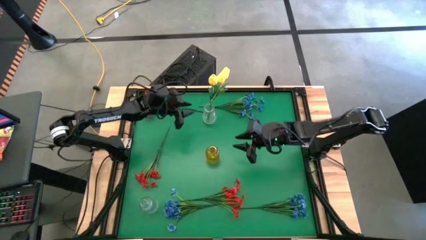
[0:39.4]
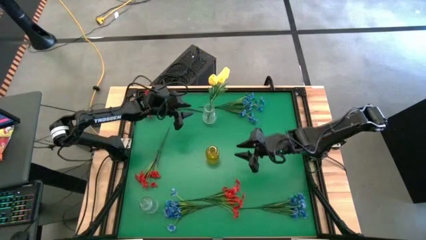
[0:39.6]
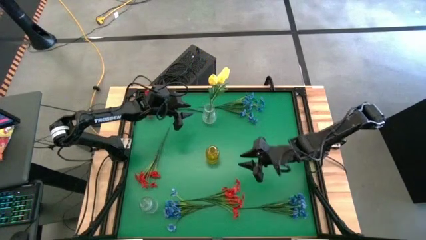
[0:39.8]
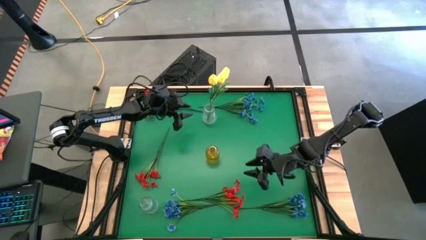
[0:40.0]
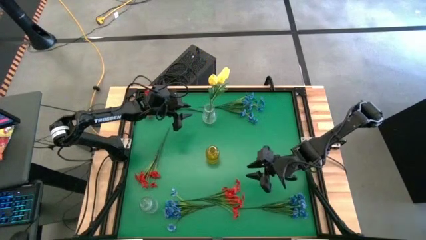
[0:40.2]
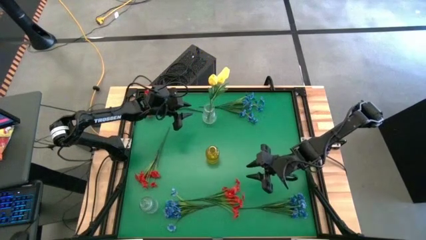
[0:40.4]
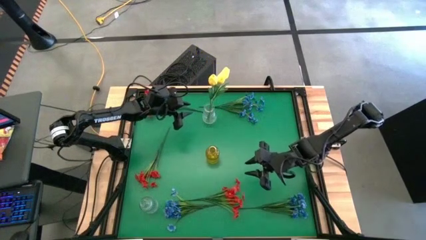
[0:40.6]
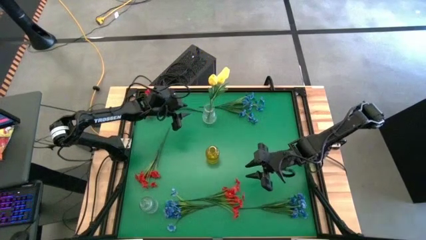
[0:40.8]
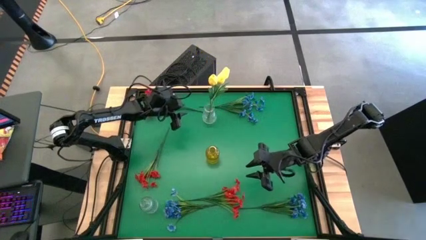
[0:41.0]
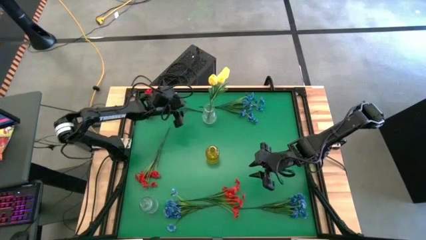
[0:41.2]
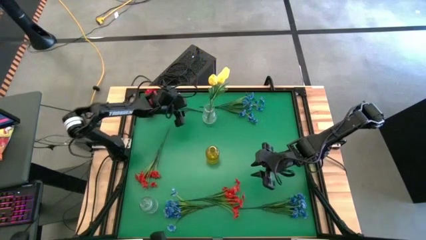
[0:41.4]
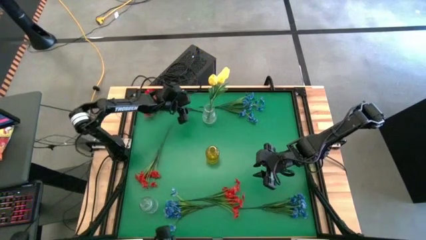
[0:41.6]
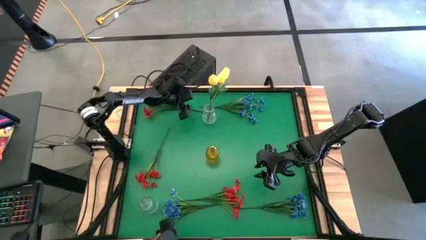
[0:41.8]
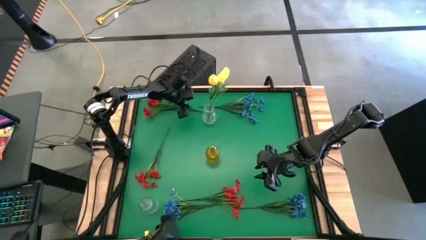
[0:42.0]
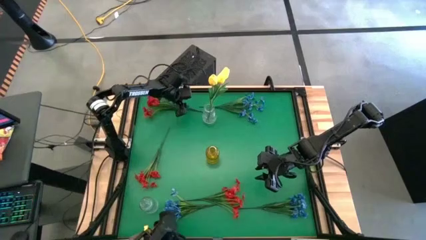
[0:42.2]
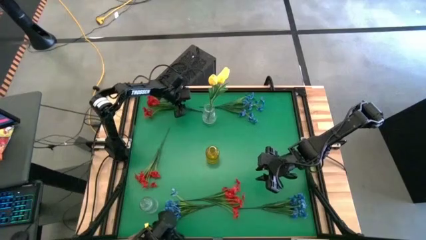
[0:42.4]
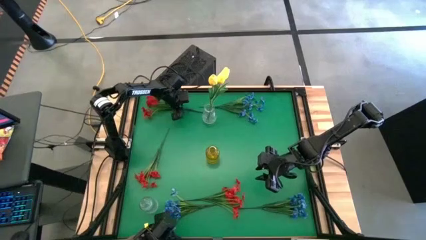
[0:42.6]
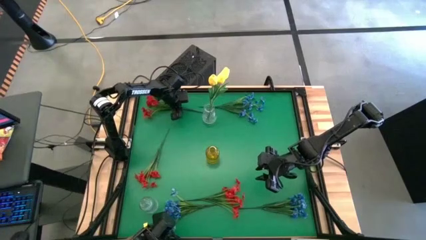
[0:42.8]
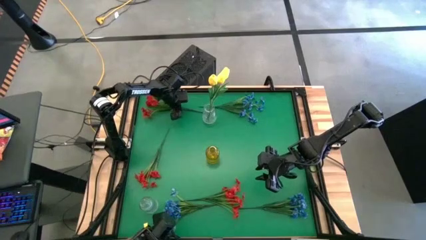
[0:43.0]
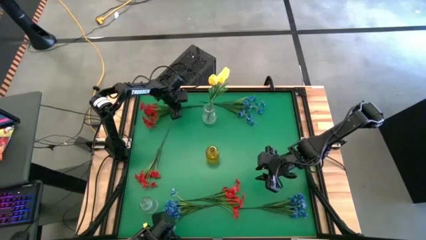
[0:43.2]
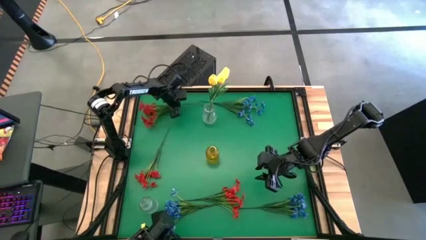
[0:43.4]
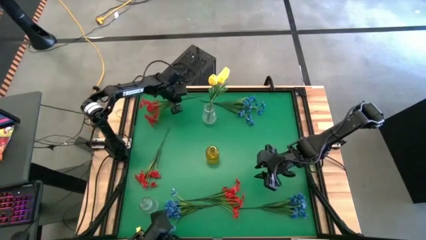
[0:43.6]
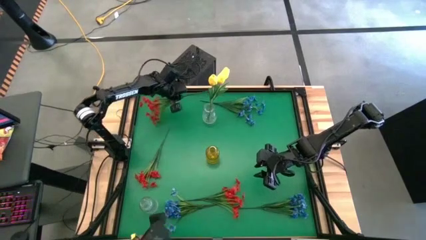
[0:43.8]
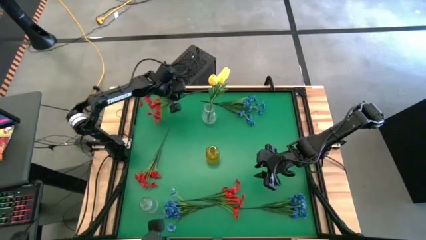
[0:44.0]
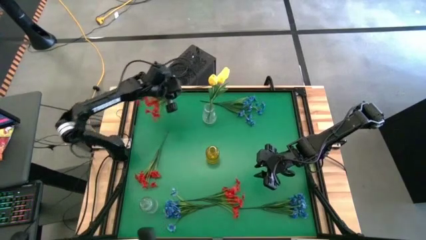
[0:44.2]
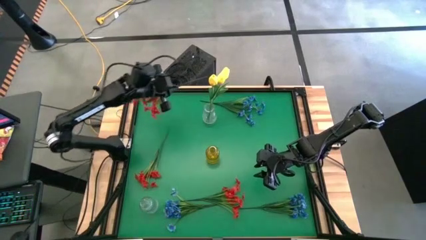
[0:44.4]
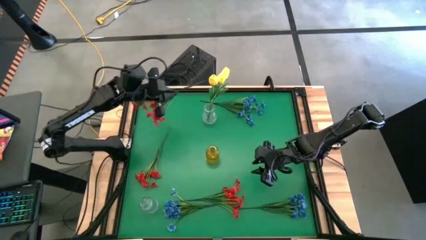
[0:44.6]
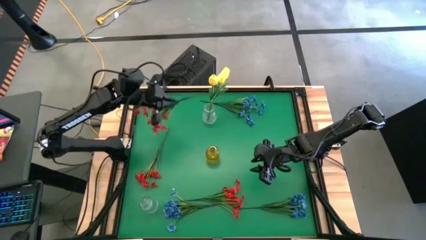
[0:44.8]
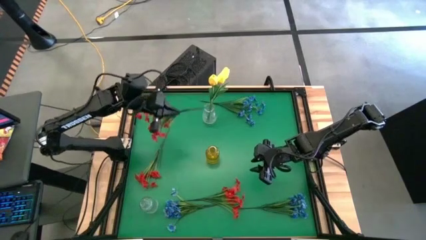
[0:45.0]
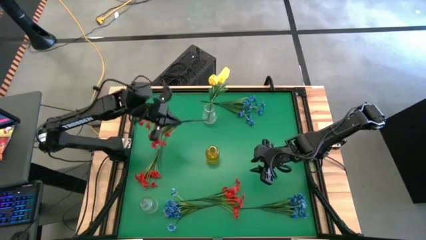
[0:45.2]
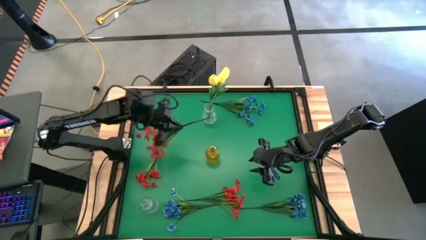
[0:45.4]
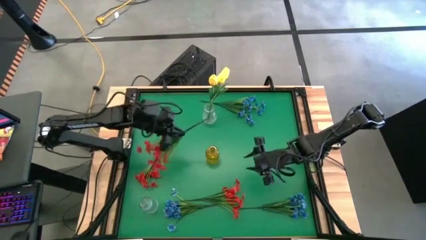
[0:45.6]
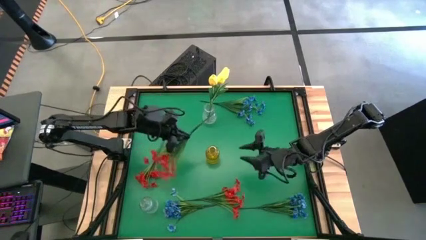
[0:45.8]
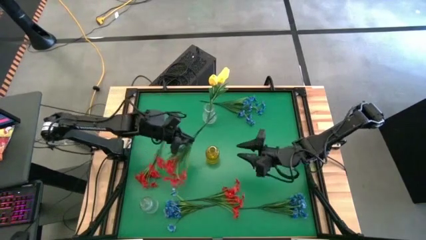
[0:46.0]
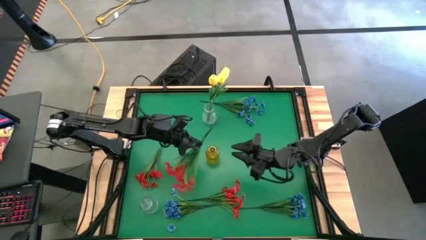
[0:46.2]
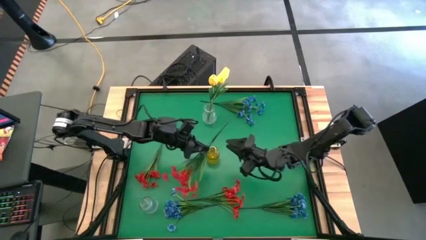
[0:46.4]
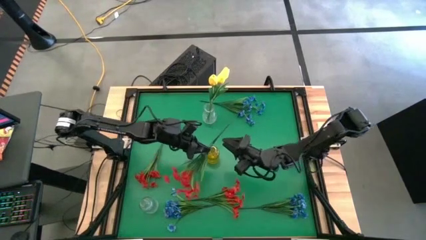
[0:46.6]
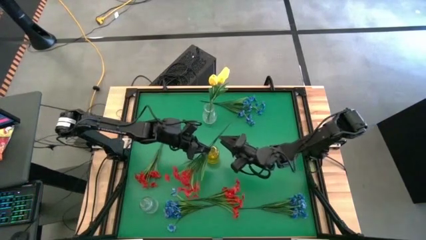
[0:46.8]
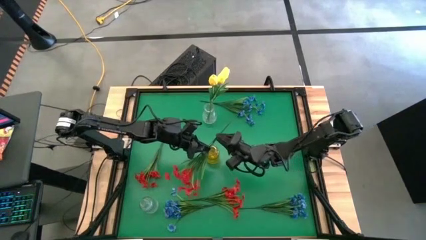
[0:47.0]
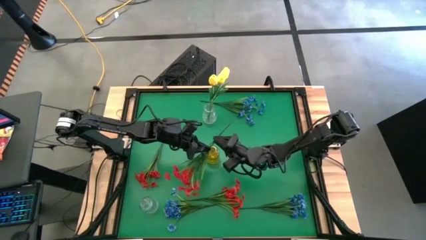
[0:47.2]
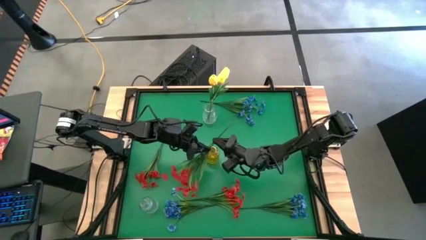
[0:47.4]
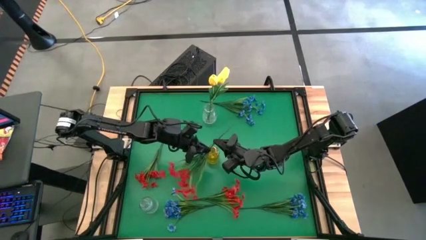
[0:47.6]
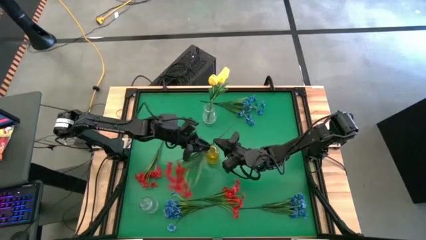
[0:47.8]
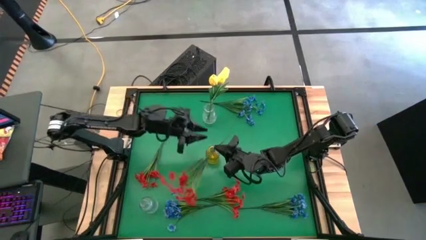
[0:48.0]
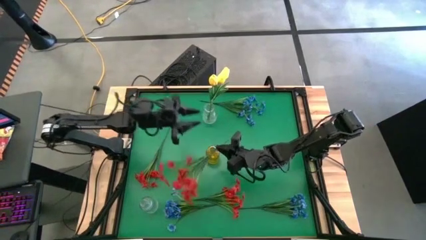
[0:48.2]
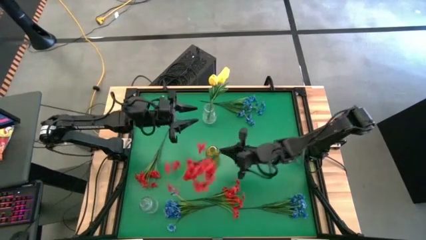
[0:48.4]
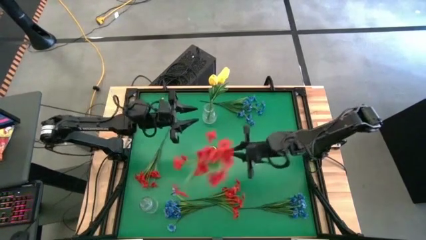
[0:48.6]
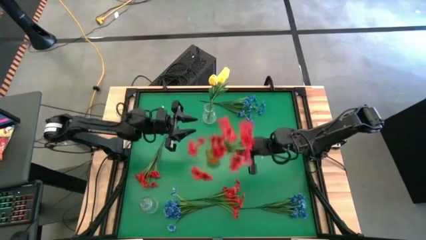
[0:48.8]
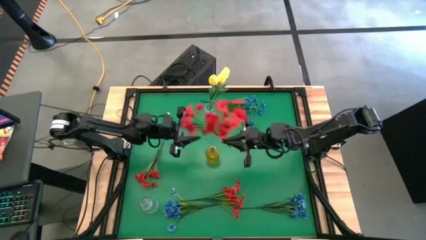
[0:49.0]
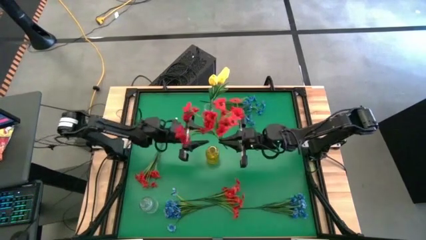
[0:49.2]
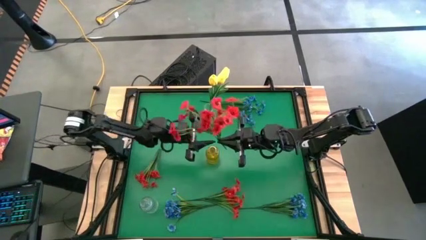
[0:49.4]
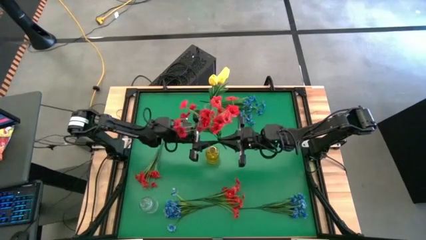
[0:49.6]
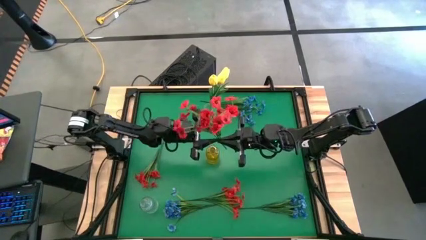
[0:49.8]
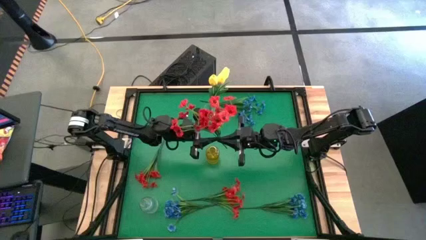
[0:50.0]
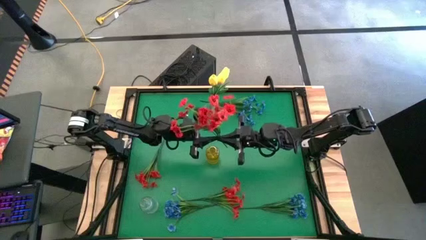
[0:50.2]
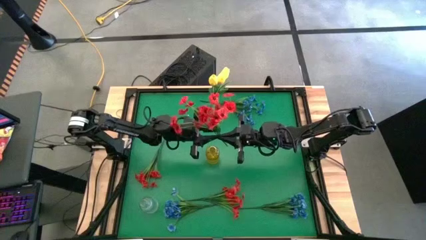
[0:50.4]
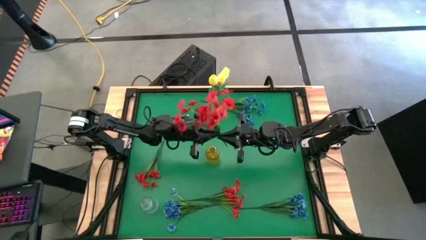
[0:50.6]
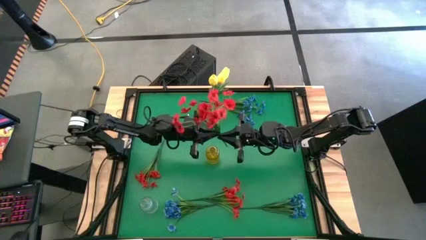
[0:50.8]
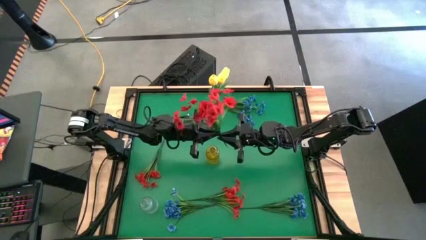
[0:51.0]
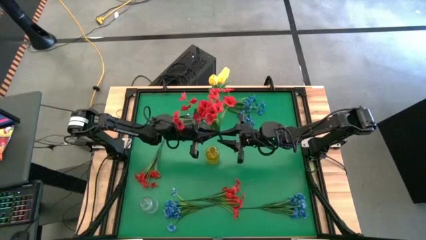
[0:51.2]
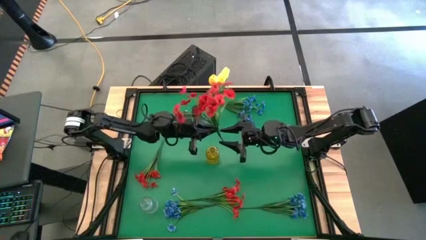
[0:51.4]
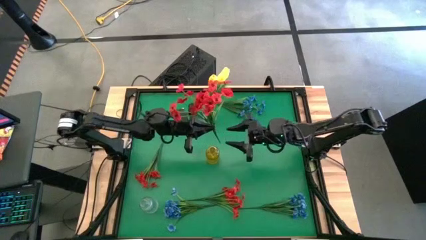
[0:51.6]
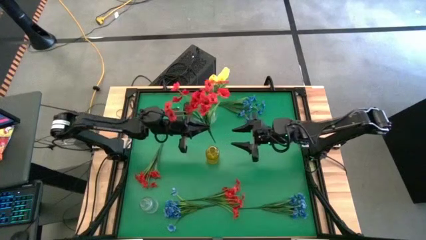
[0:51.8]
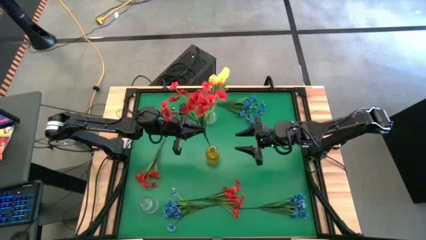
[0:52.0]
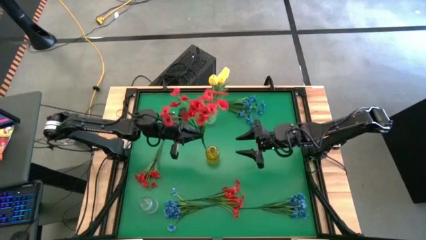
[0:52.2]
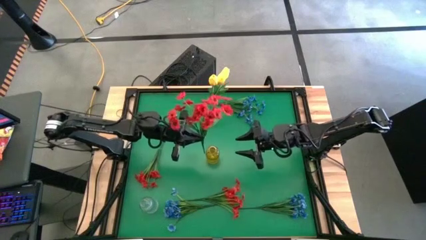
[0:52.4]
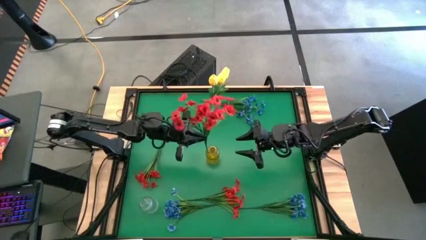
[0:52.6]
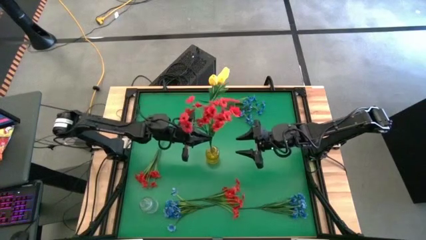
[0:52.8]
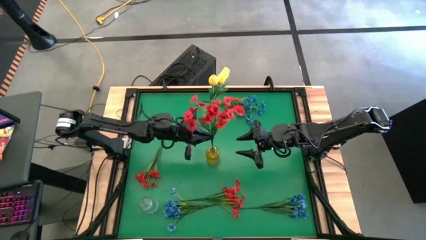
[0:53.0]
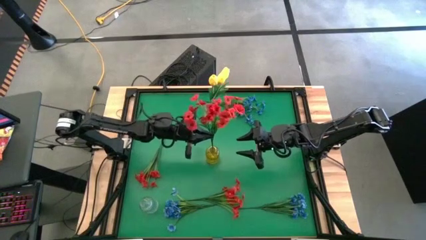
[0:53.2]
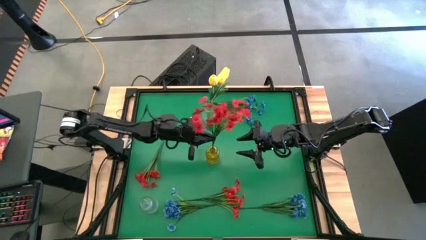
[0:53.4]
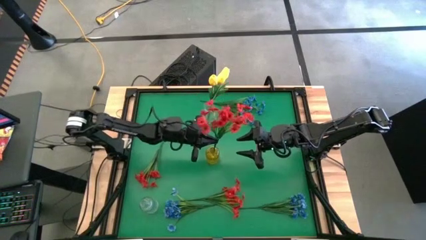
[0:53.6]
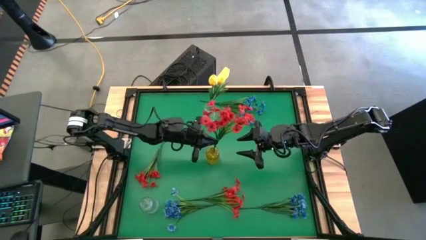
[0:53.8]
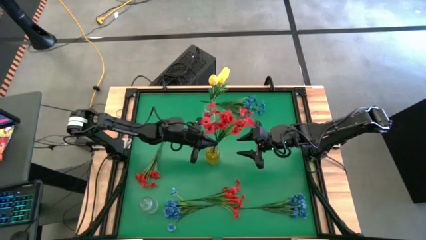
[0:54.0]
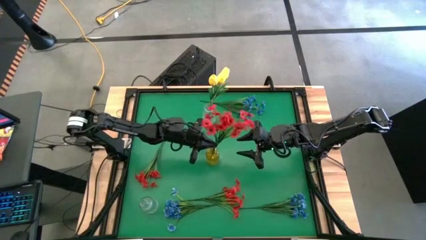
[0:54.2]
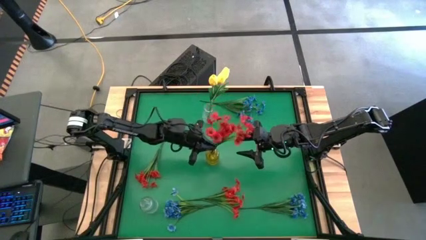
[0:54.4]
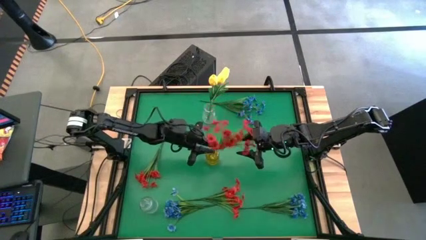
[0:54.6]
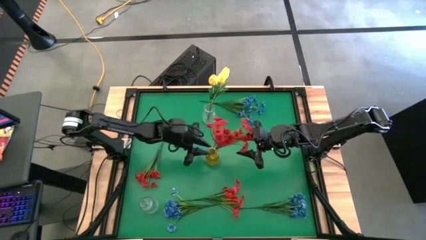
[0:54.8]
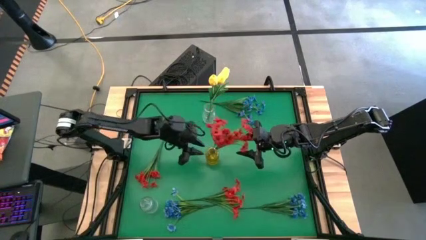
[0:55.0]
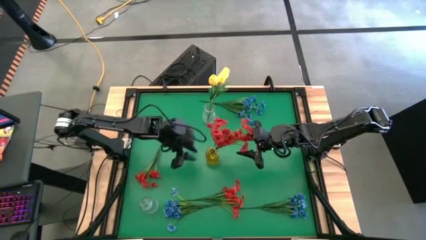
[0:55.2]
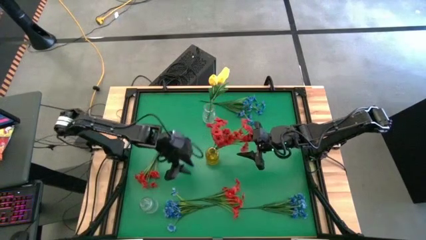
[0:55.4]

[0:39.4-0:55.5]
Task: Sort flowers into vase by color
Put the top red flowers into the yellow vase
